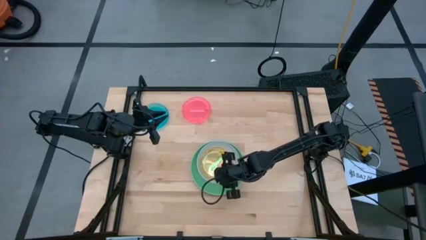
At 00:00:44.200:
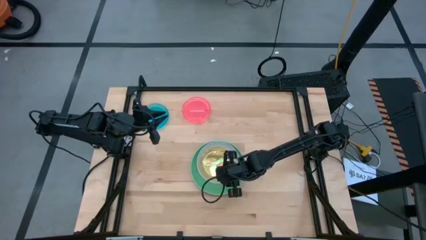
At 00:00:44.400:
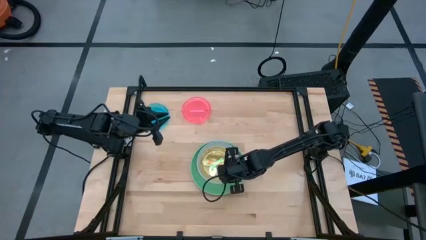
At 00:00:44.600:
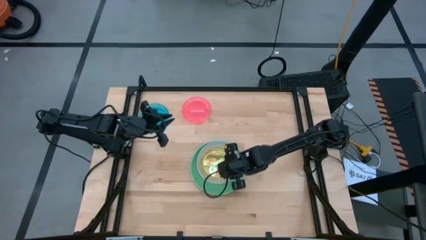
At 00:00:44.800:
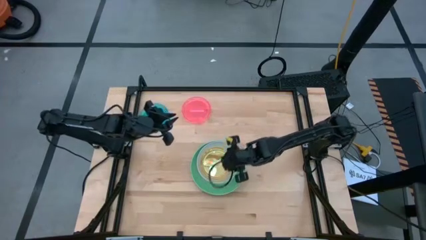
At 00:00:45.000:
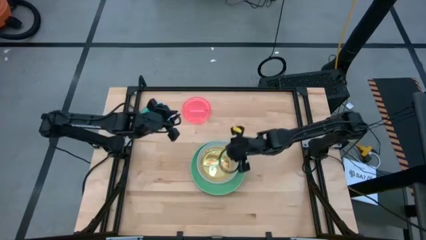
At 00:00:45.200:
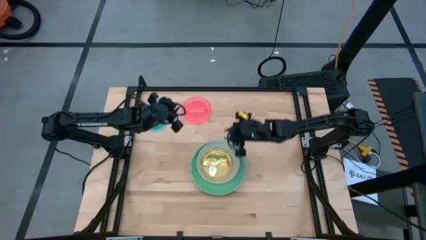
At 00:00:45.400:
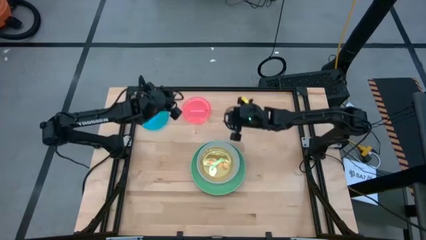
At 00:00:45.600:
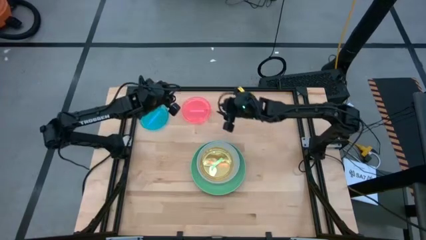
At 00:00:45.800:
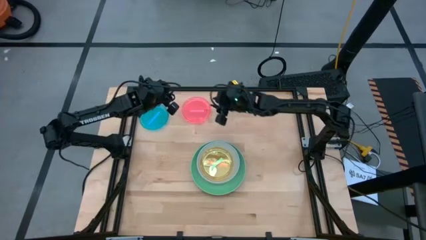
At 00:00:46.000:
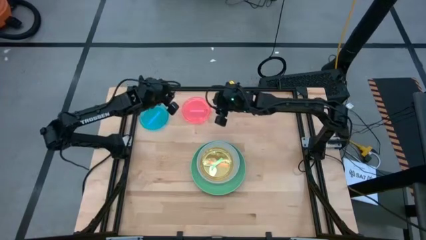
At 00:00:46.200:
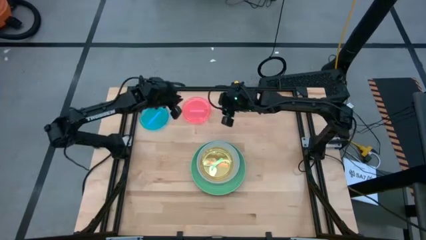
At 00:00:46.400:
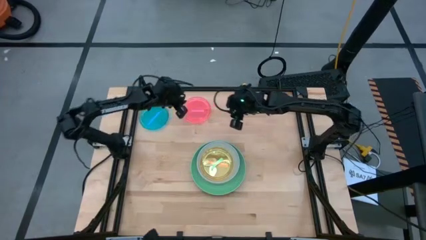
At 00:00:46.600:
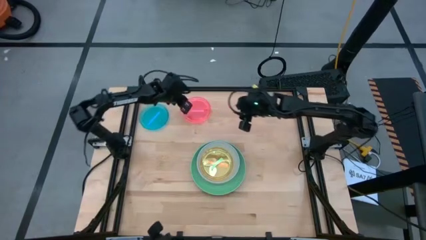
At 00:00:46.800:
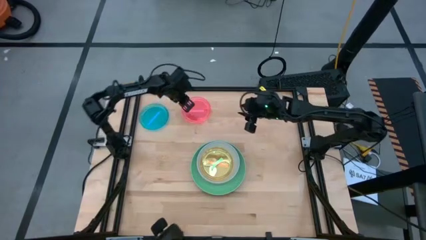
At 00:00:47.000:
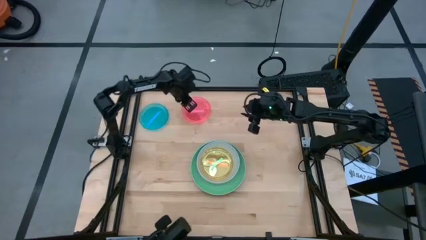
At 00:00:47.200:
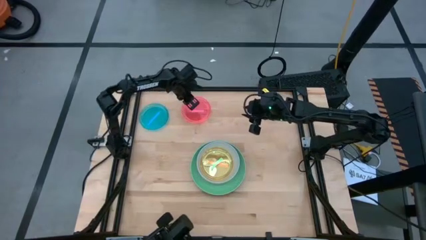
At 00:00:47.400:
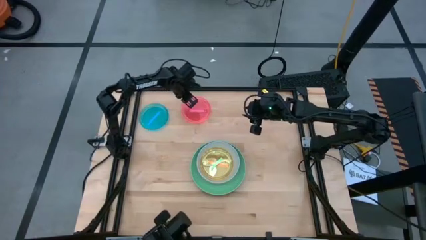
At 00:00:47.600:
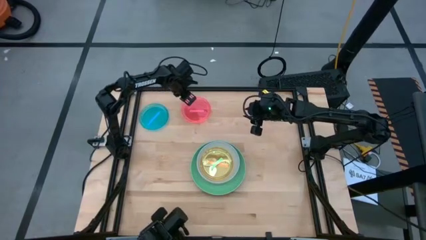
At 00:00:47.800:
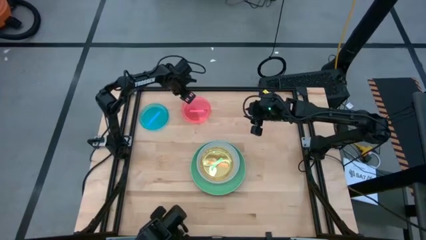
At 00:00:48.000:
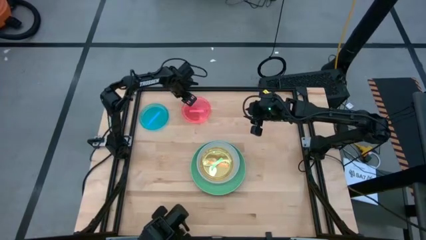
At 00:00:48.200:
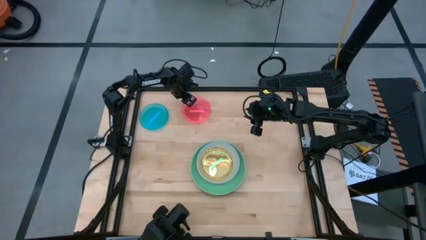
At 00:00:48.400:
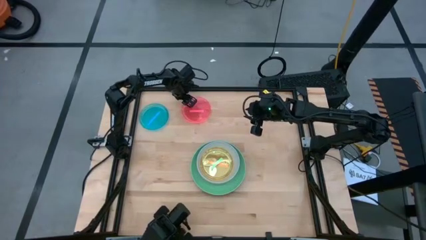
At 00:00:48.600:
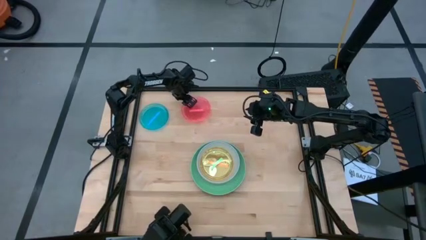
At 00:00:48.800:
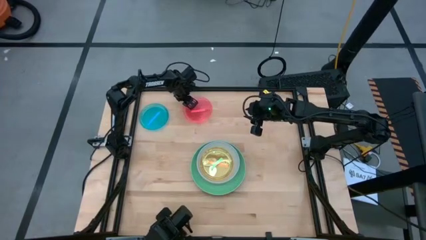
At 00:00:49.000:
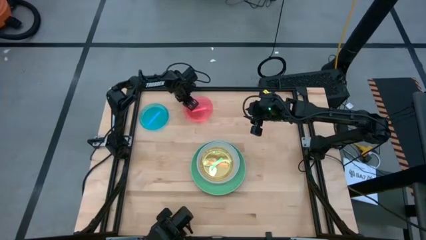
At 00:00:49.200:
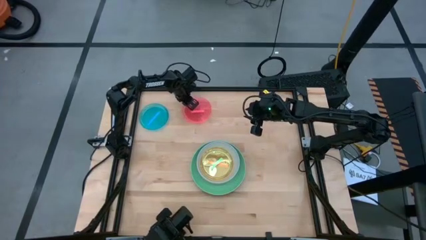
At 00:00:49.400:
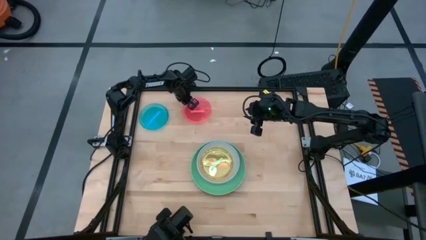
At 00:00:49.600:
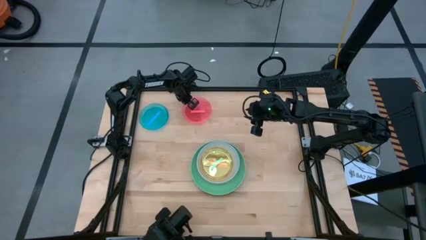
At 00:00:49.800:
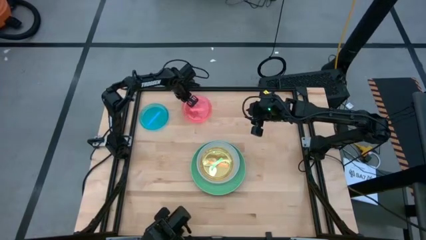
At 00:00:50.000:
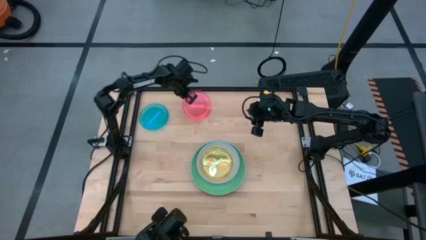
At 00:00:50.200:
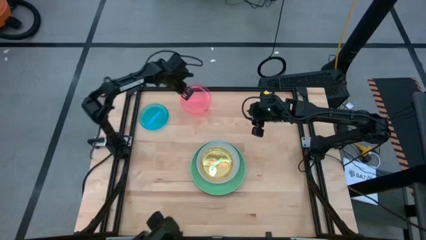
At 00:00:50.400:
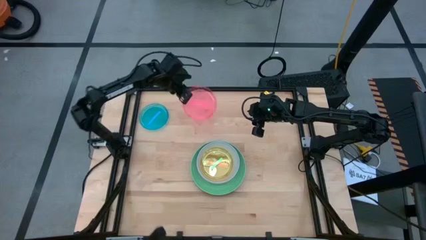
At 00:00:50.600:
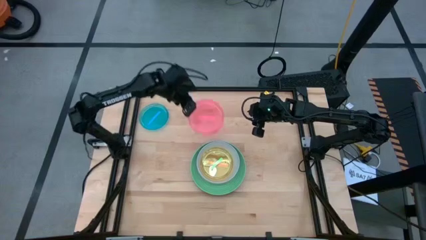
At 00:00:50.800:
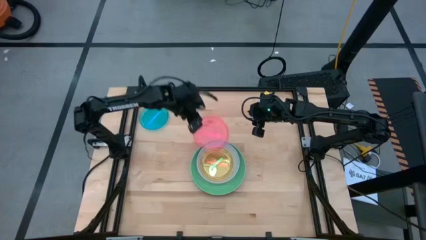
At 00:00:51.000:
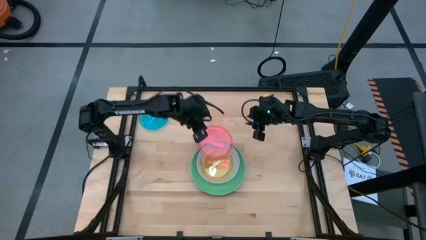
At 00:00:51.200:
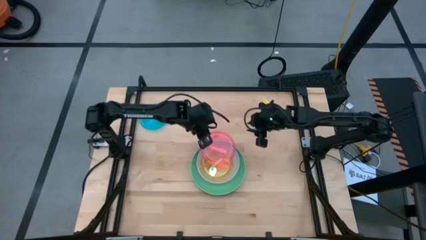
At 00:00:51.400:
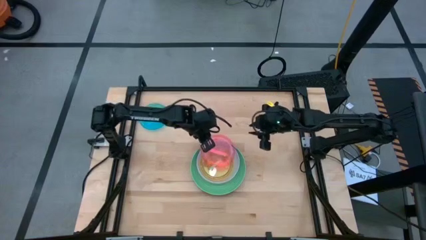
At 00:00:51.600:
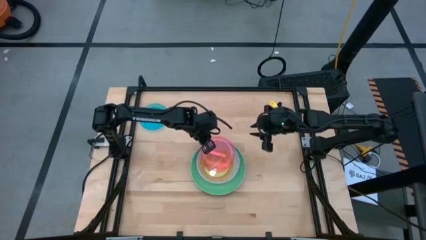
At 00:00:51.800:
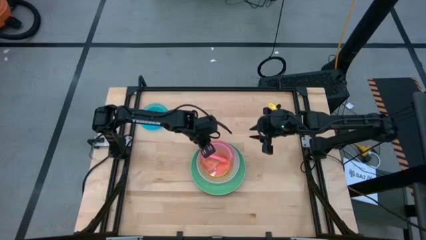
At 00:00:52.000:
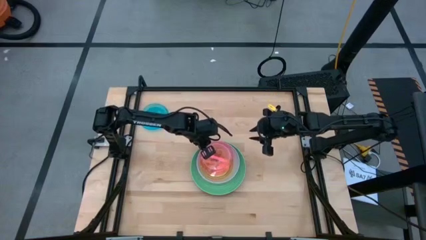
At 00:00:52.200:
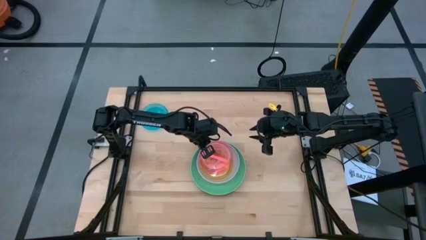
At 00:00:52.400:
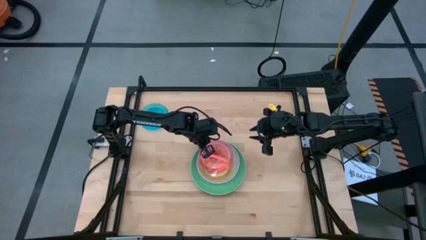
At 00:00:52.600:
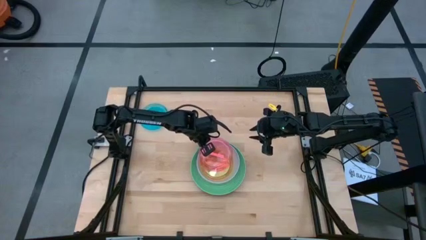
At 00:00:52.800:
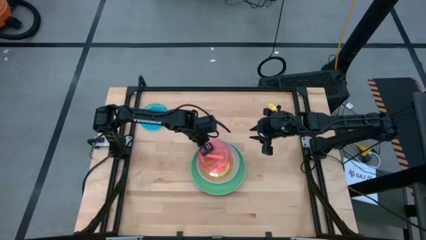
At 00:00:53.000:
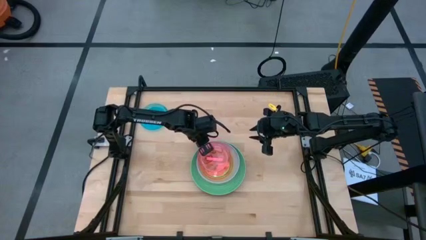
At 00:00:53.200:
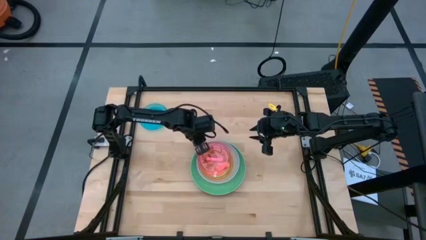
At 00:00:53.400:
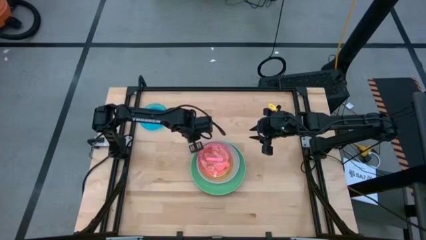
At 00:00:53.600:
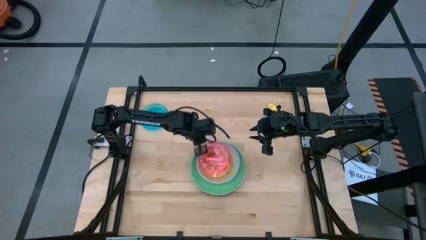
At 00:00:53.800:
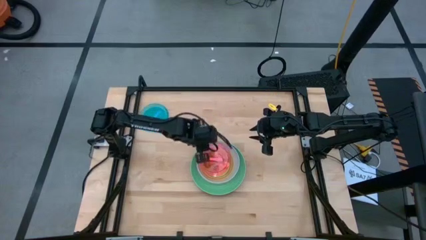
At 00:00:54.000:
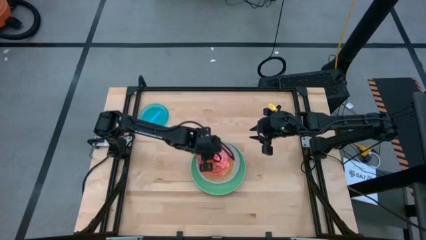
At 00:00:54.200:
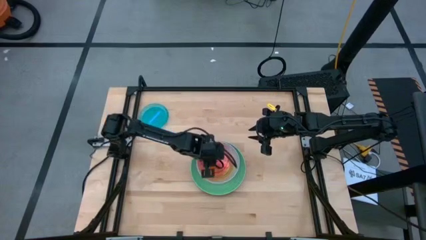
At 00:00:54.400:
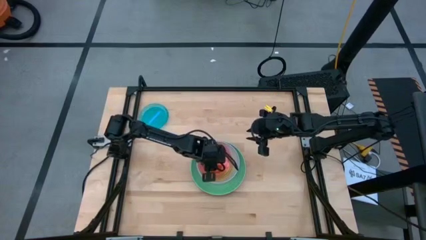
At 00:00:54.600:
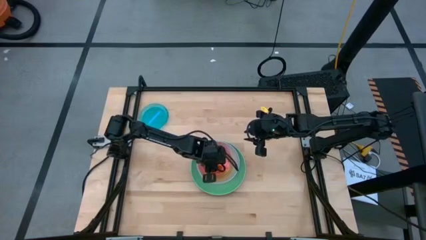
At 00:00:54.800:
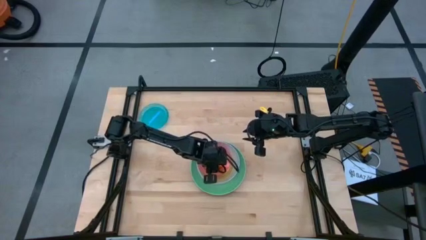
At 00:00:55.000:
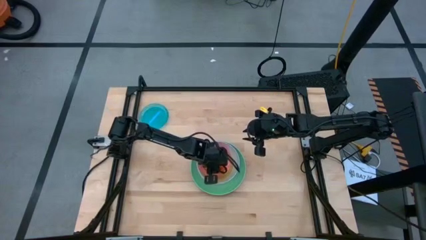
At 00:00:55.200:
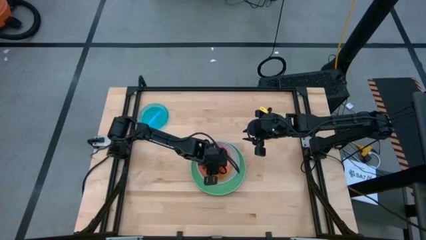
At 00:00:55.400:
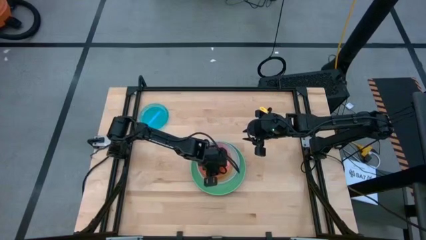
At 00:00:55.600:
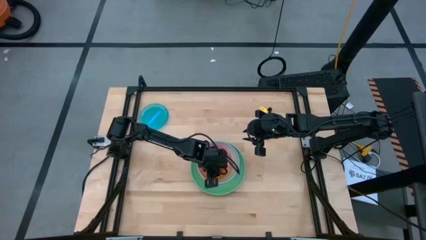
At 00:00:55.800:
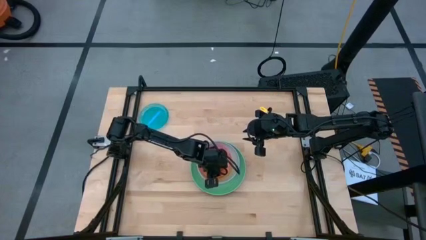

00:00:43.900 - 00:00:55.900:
Task: Stack plastic plates
Stack the pink transparent plate on the green transparent plate

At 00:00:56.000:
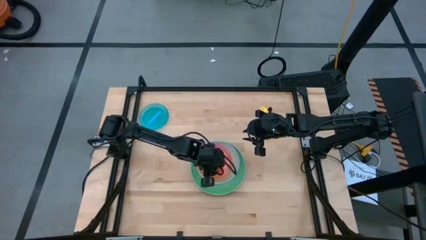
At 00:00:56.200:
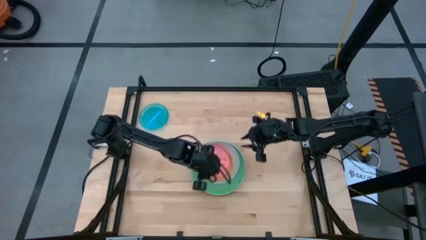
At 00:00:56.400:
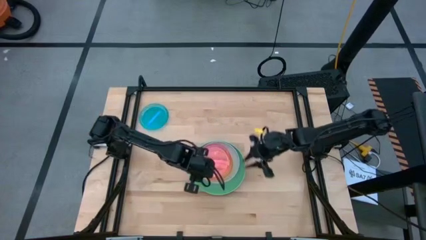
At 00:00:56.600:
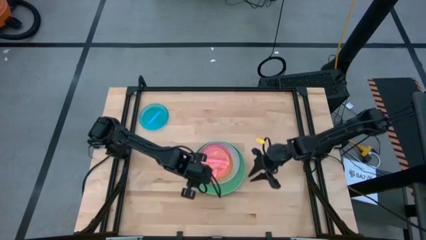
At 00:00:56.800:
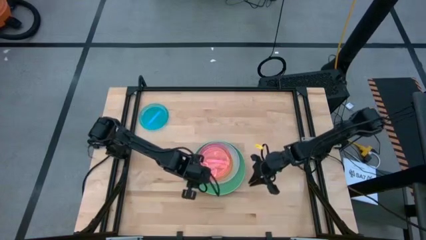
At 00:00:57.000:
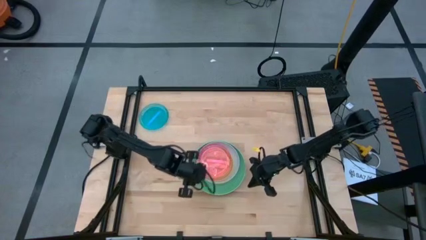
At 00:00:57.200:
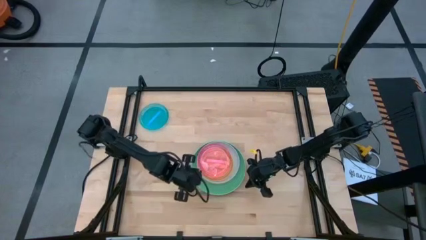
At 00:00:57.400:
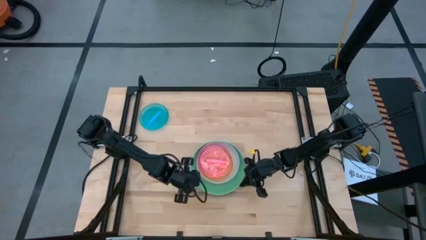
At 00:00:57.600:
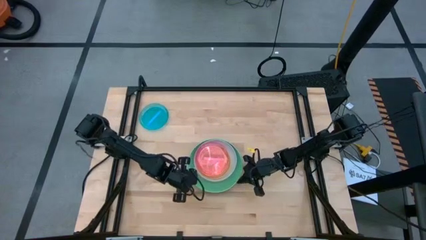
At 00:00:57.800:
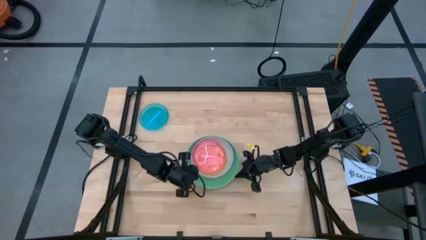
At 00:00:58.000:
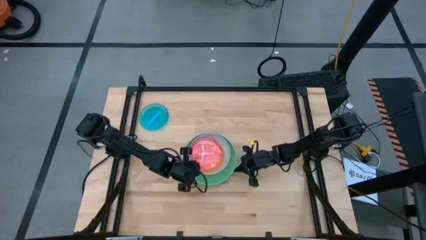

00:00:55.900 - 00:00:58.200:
Adjust the stacked plates

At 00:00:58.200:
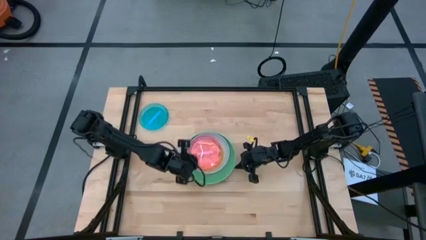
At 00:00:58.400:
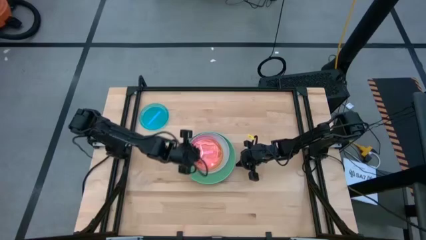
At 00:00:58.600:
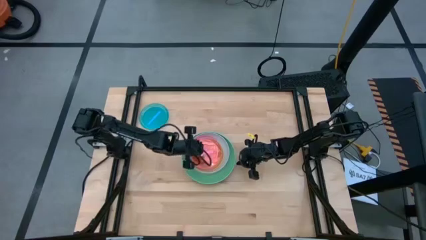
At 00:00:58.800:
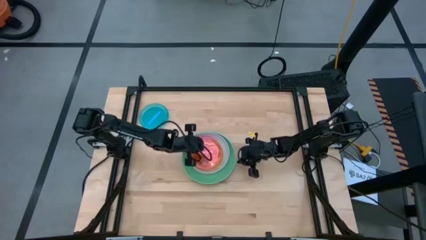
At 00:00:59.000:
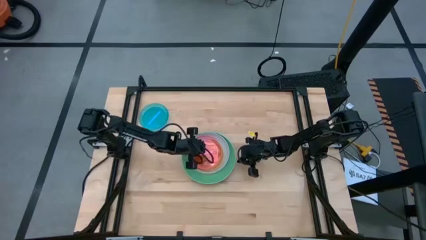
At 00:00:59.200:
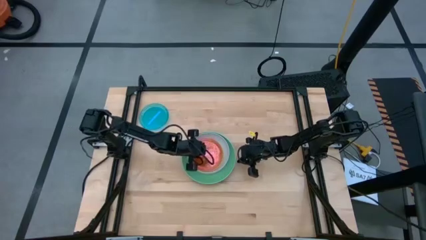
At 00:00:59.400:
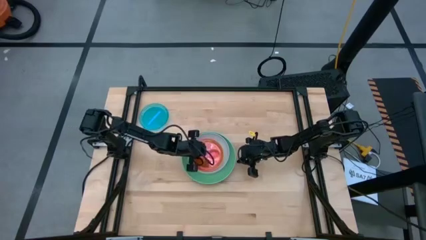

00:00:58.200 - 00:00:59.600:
Adjust the pink transparent plate
